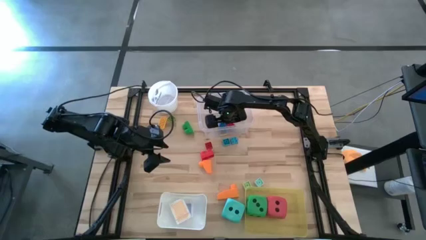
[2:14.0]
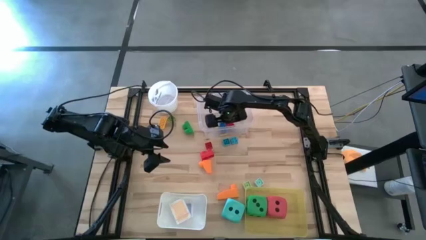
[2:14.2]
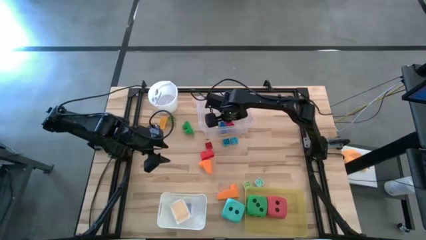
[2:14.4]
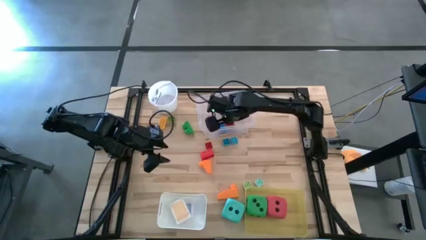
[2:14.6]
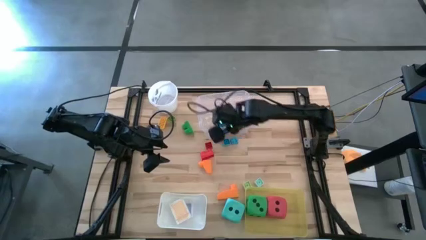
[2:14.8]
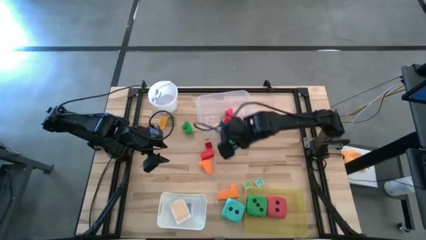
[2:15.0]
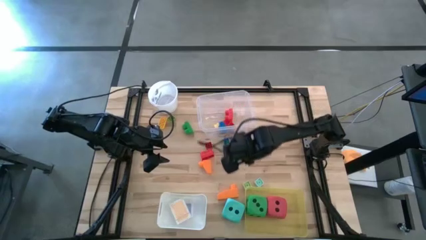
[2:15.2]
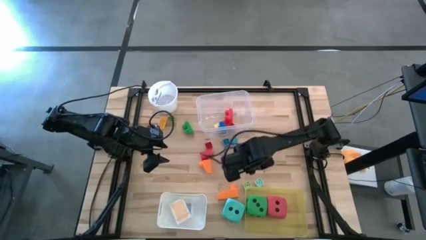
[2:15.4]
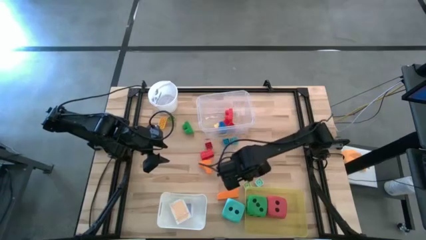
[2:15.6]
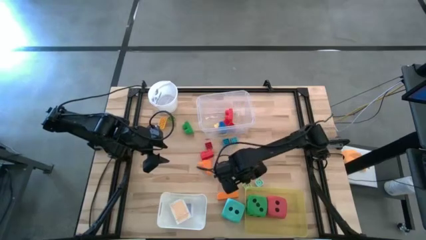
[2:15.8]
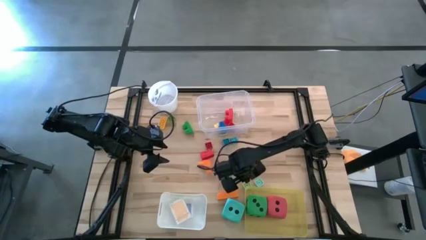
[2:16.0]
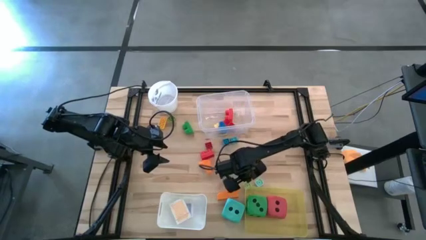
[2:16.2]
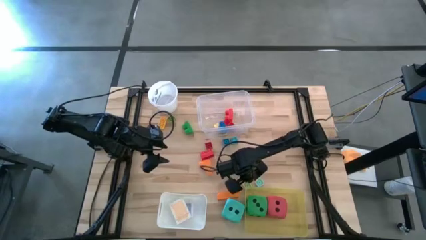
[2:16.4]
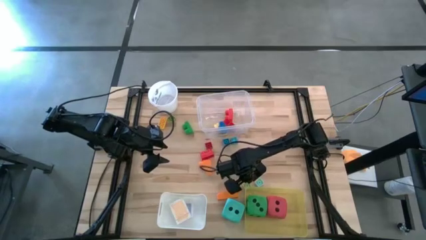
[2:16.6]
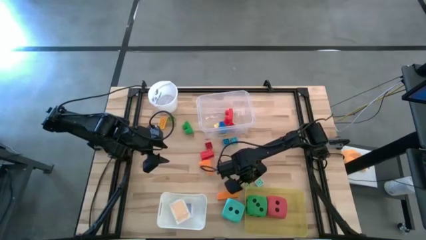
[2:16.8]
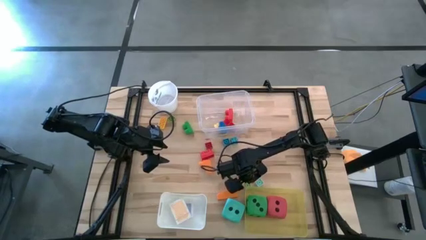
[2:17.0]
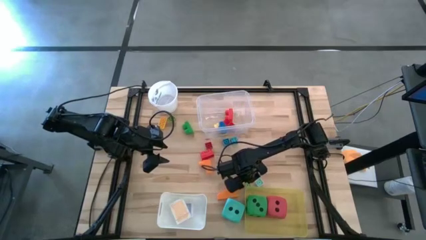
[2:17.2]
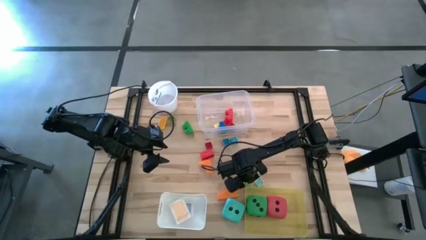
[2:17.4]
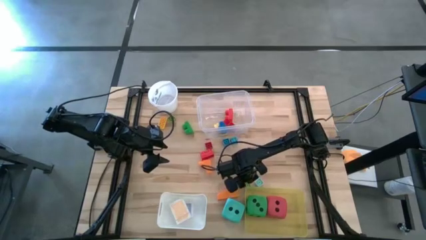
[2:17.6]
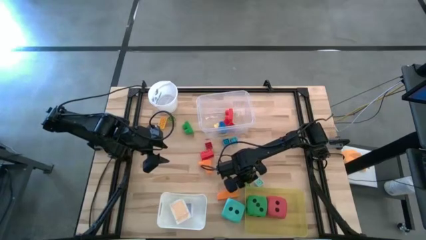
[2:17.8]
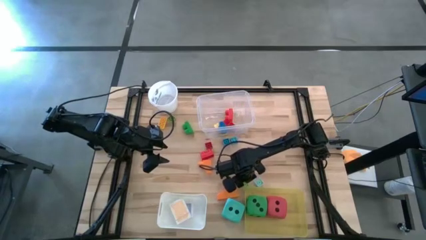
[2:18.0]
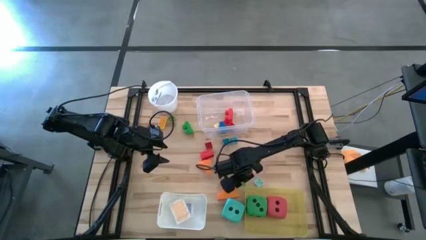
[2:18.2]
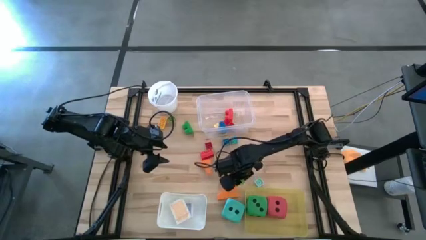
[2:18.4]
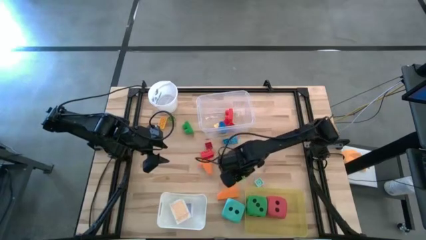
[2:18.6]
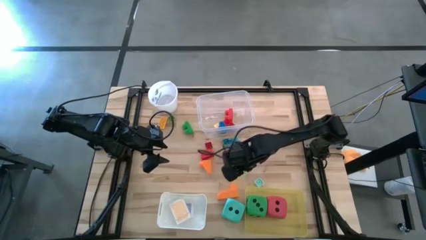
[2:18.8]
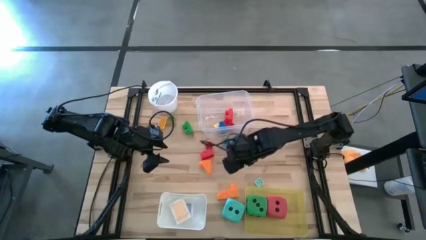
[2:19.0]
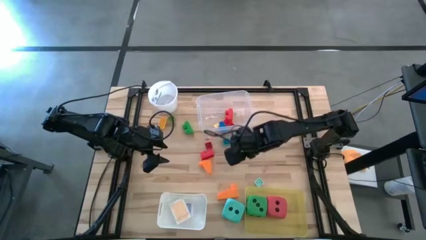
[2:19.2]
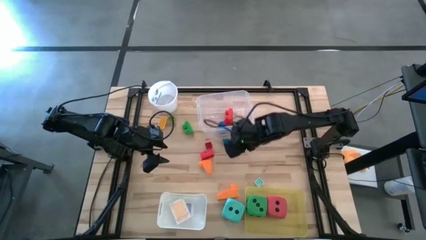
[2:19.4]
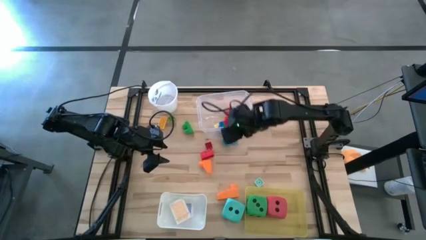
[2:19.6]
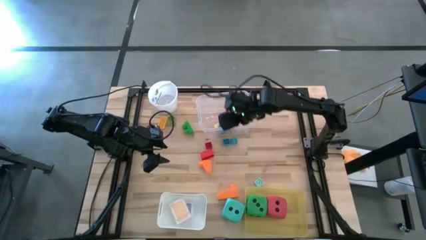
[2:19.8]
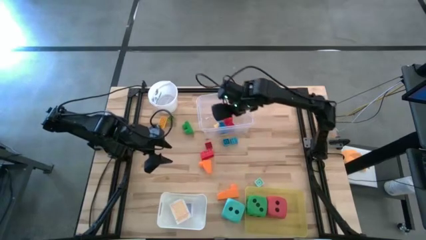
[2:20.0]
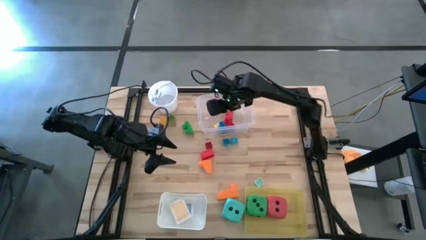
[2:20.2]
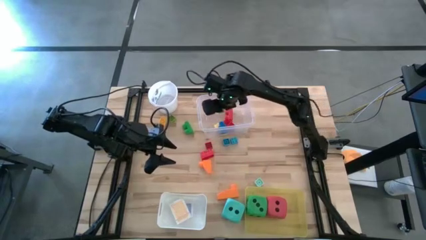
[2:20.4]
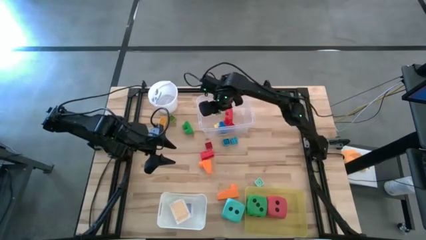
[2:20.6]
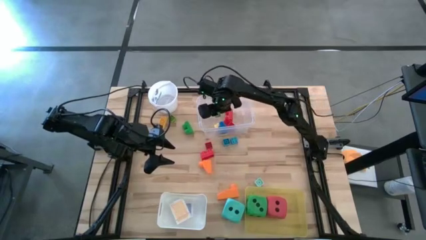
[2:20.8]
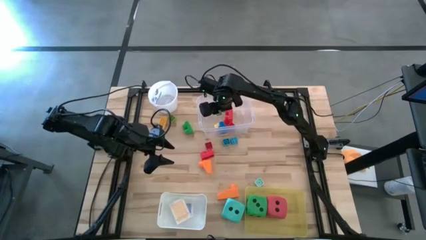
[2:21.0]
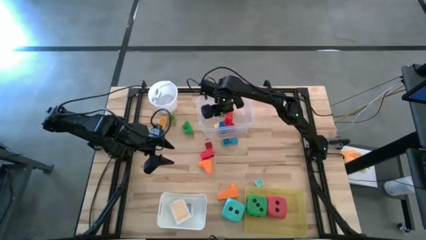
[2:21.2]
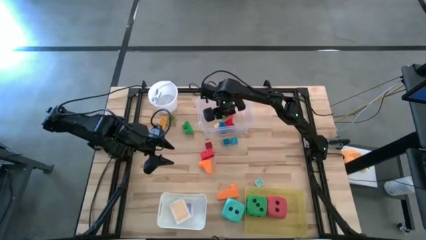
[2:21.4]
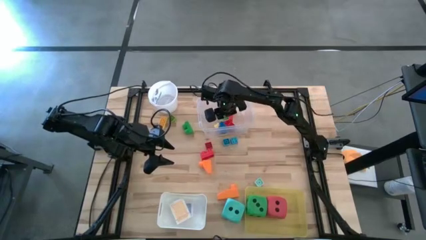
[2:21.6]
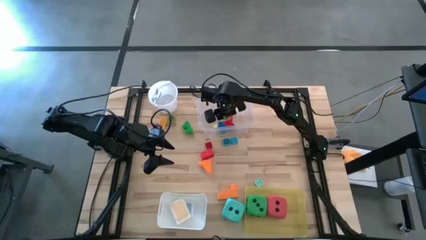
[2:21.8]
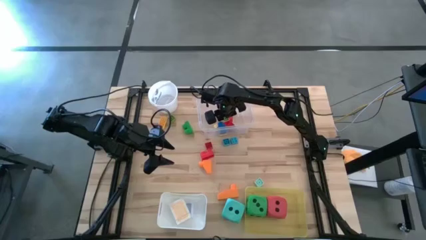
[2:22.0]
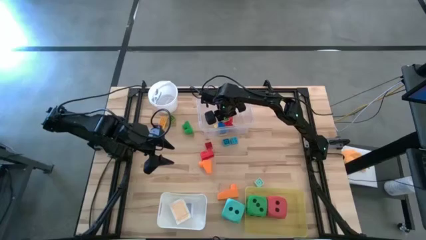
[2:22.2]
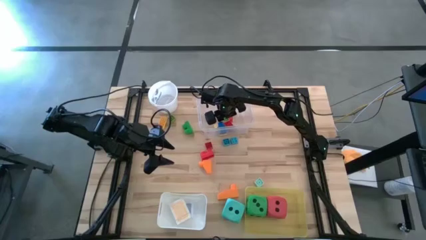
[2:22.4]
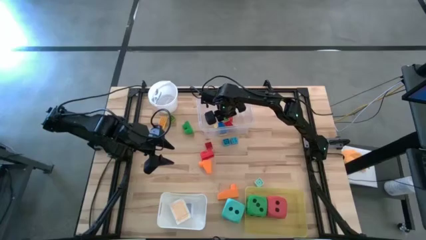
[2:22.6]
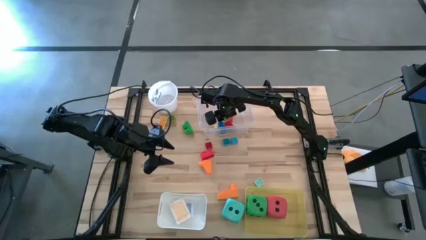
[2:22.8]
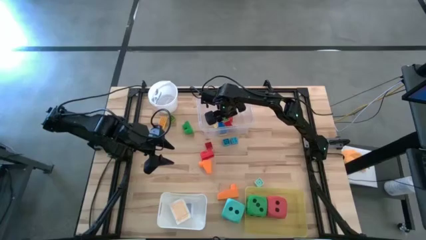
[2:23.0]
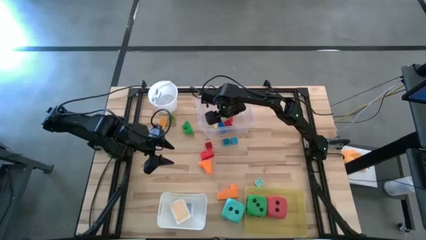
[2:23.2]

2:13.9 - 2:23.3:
Task: Pick & Place Toys
Put the light green game piece into the transparent bin

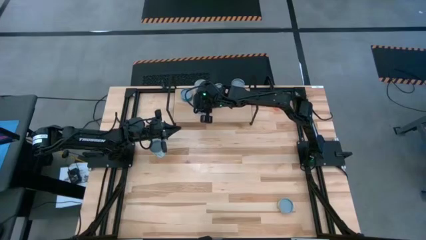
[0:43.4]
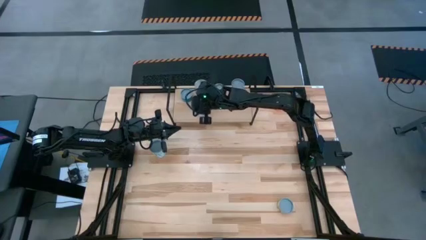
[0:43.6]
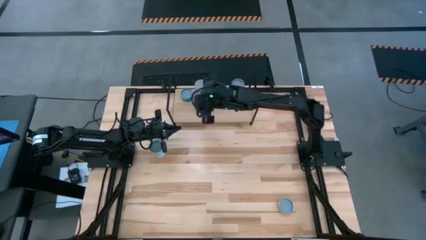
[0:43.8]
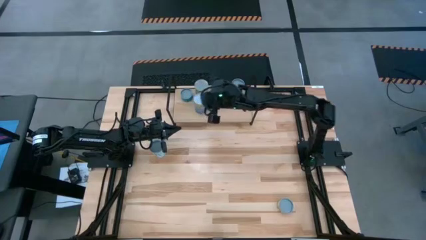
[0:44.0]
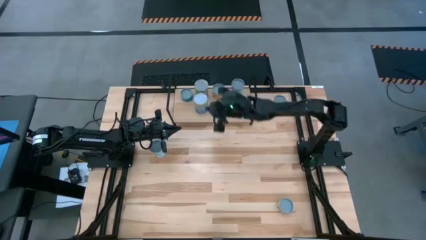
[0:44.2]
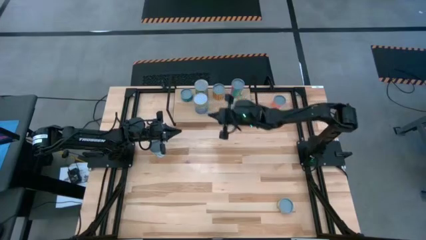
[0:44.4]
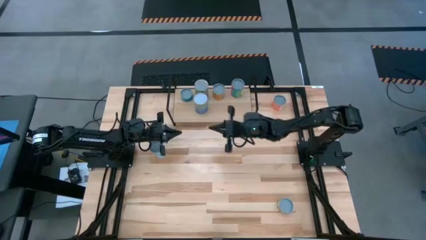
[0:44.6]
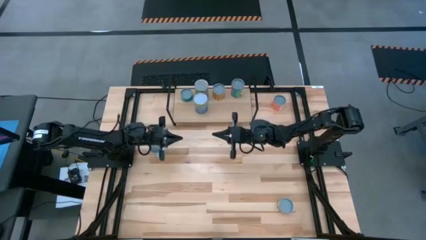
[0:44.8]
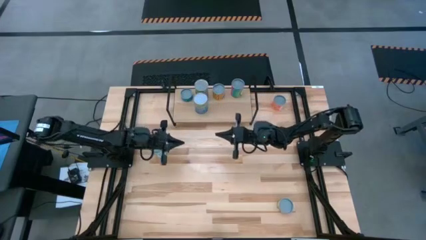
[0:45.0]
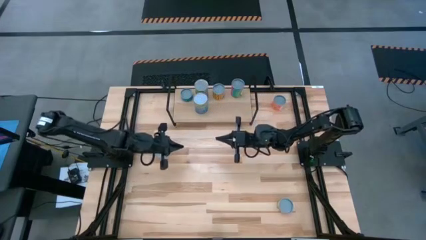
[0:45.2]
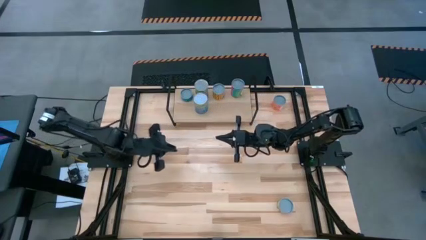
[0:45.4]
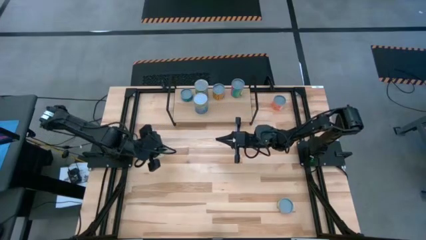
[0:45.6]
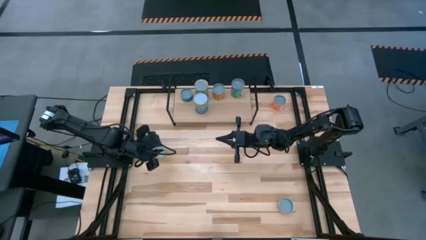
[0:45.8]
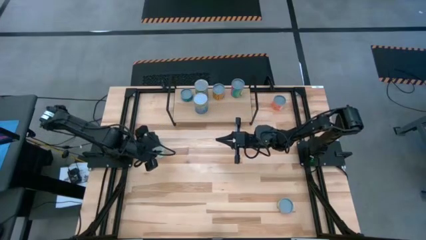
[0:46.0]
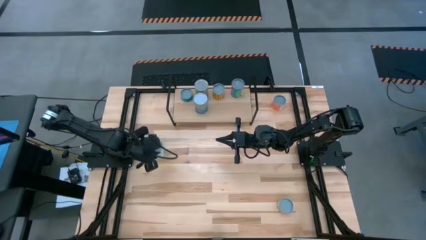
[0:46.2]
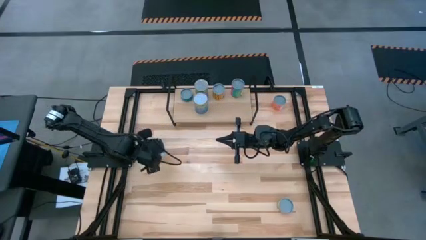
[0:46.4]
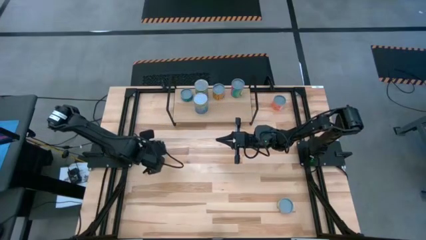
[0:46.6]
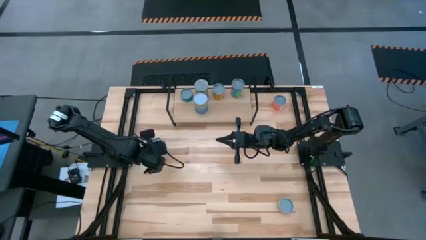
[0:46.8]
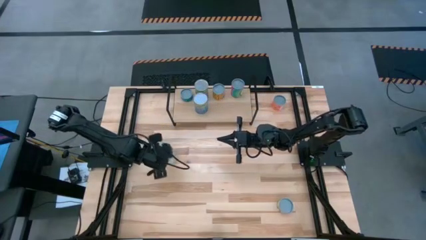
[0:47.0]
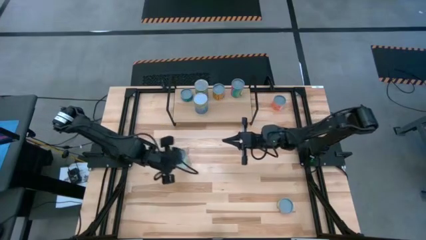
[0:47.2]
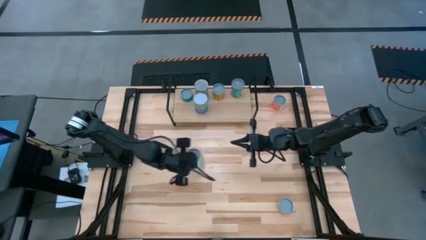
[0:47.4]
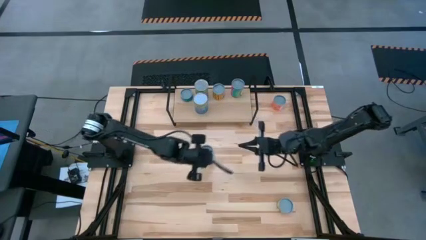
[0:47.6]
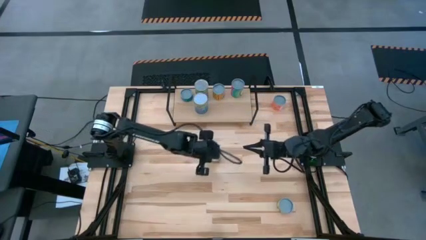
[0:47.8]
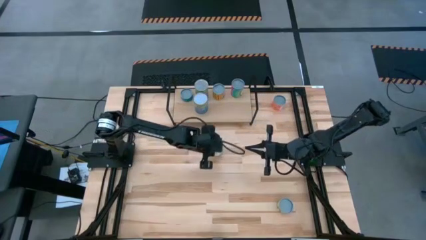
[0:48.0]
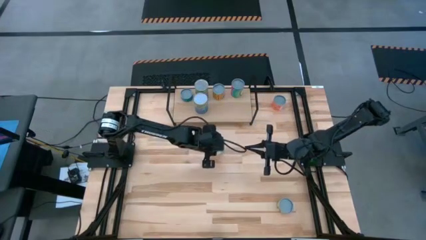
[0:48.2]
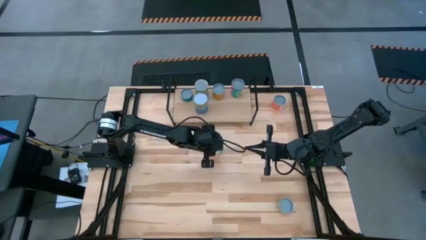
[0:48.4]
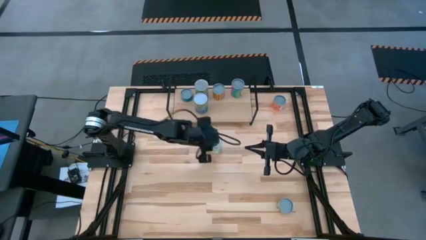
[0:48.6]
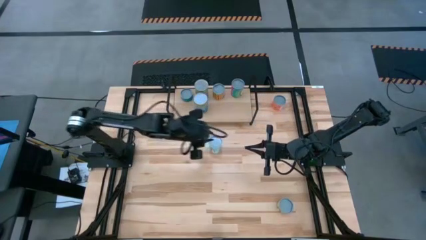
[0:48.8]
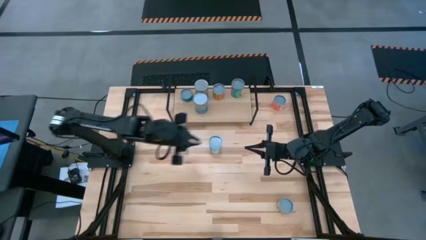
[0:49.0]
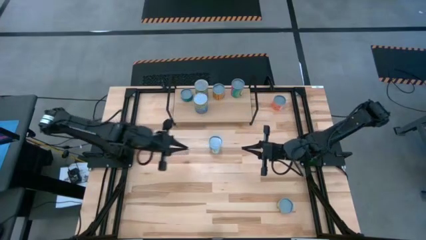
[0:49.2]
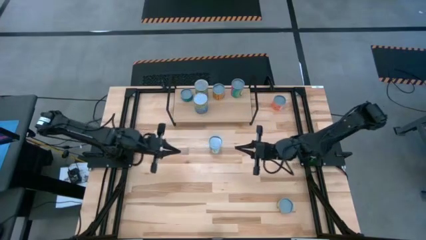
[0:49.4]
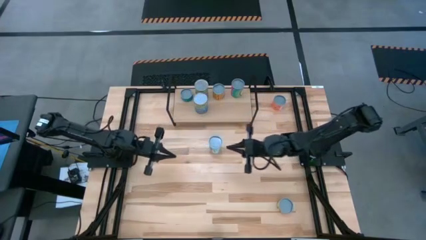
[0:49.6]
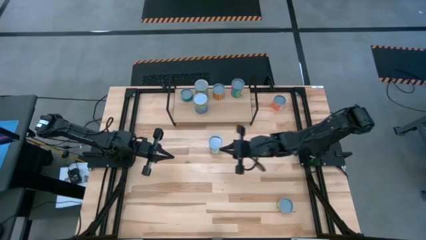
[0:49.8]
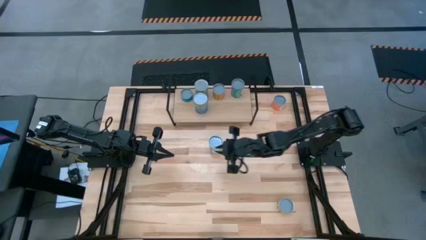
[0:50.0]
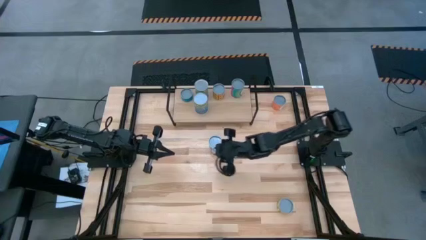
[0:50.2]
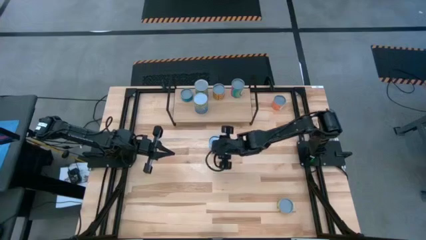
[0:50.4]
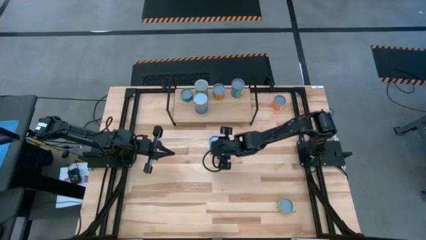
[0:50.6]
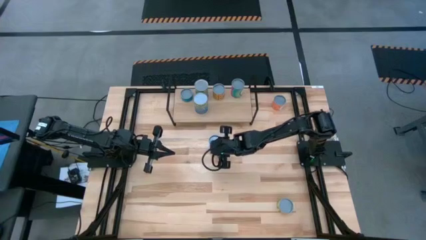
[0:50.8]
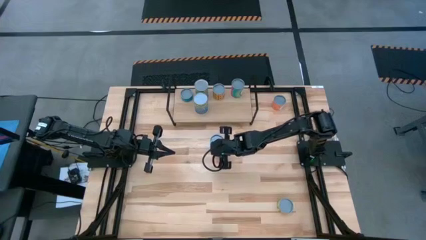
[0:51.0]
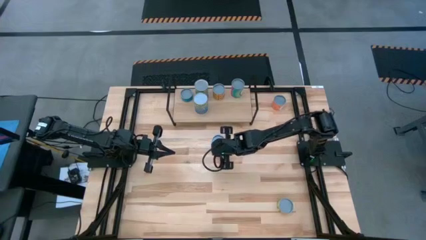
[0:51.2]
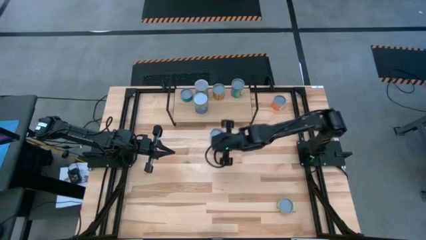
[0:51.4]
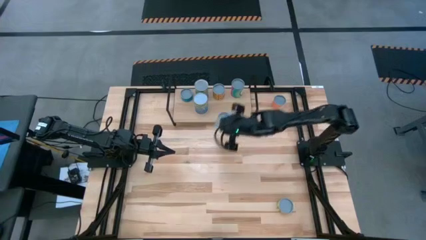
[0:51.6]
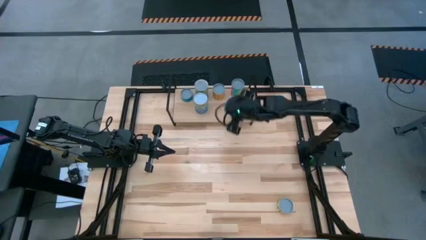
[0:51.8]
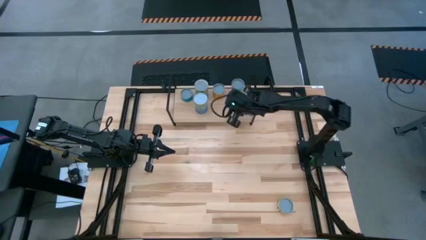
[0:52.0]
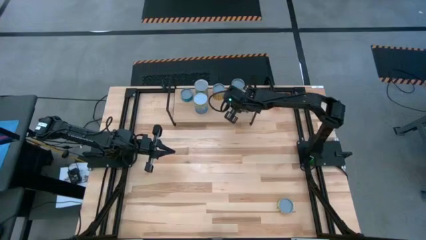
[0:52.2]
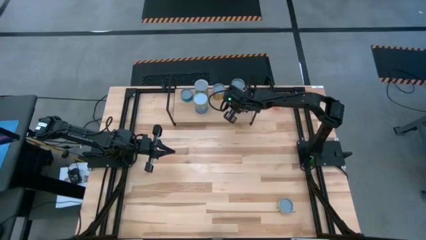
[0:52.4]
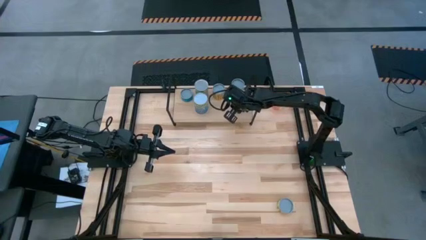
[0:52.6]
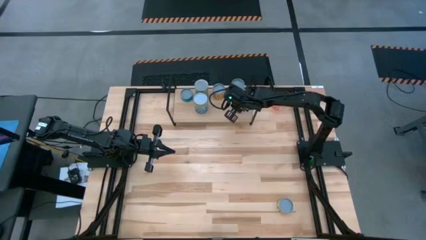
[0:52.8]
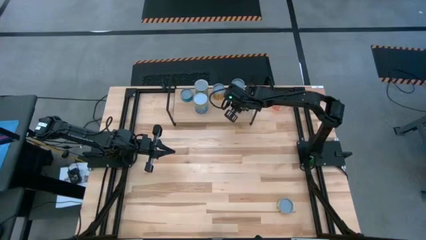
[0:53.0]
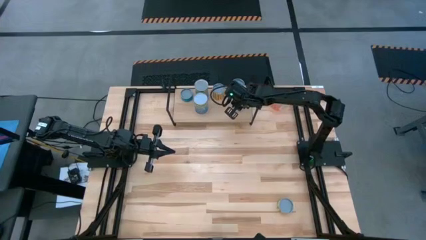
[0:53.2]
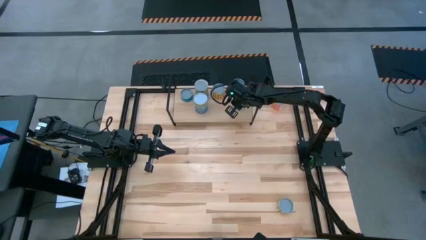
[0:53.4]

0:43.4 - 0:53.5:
Task: Pick and place cans onto a shelf
Put the canned vegetables on the shelf
